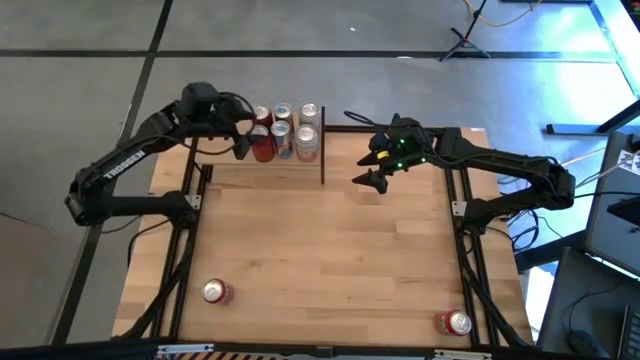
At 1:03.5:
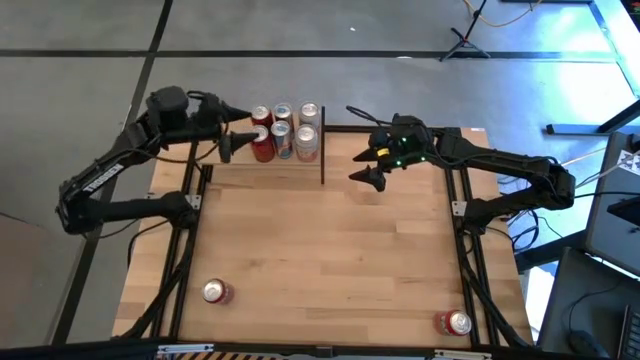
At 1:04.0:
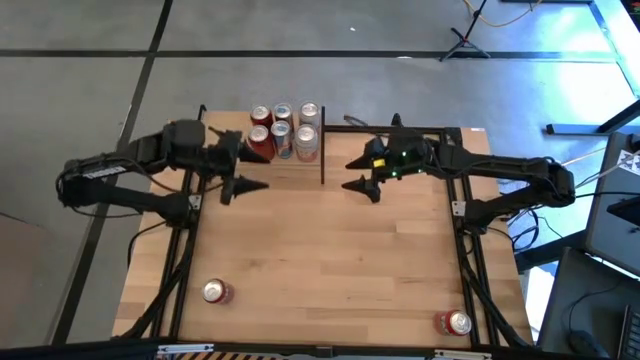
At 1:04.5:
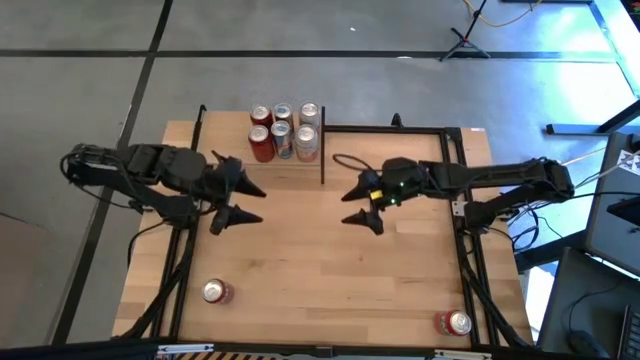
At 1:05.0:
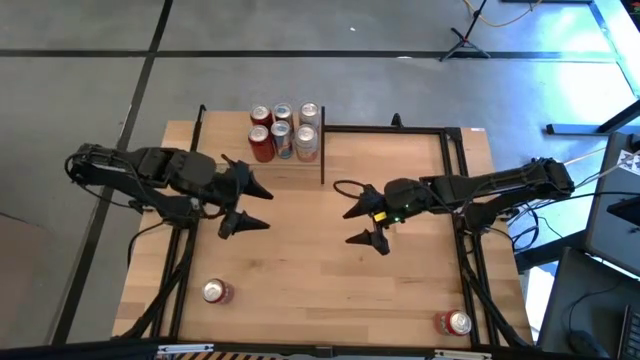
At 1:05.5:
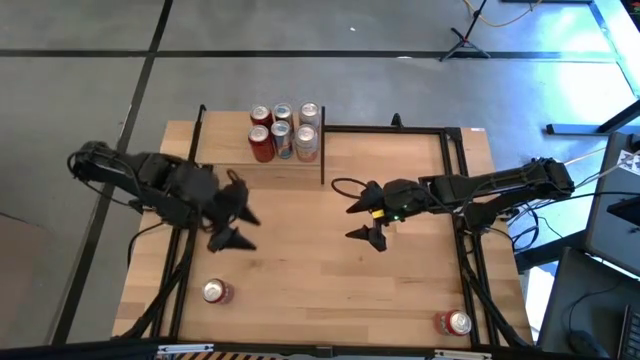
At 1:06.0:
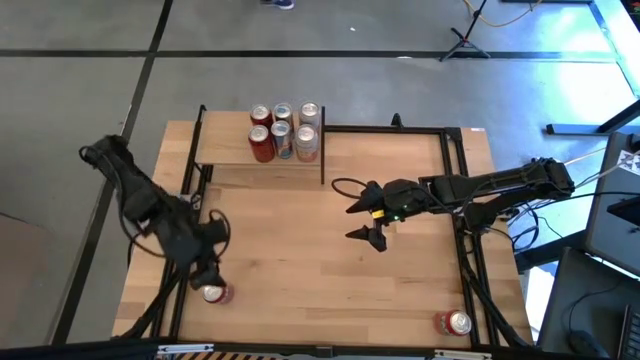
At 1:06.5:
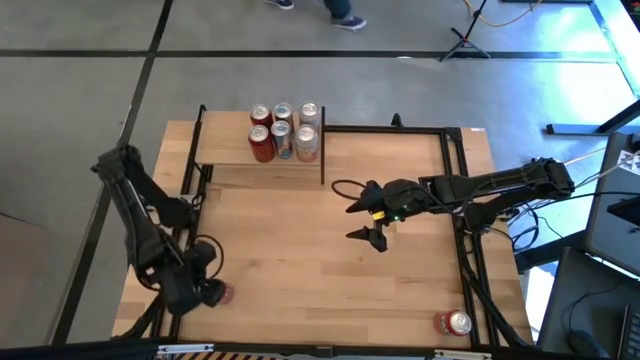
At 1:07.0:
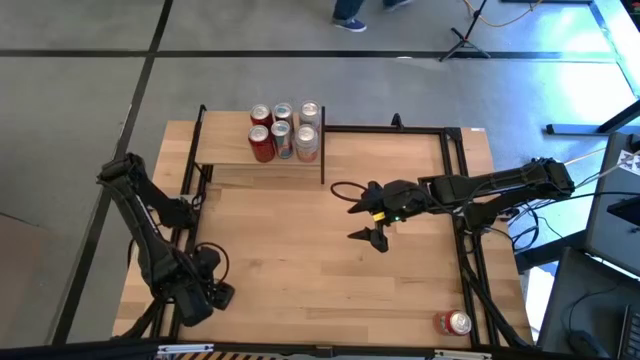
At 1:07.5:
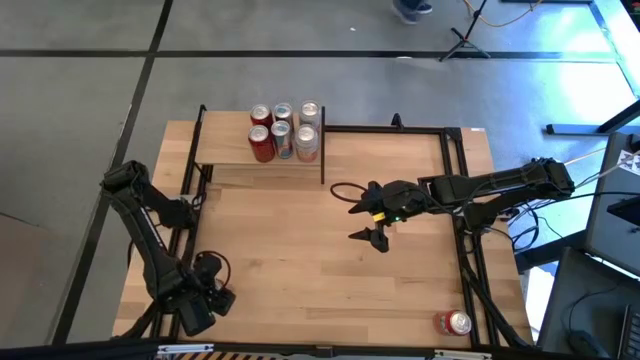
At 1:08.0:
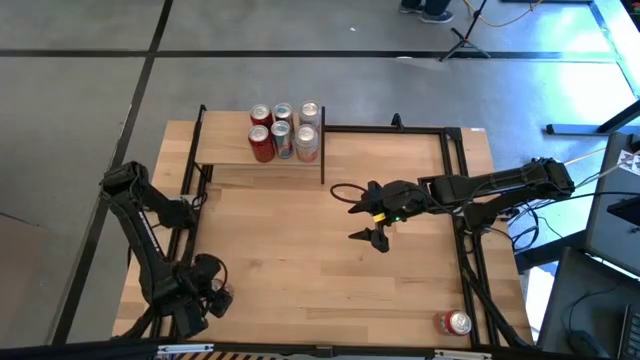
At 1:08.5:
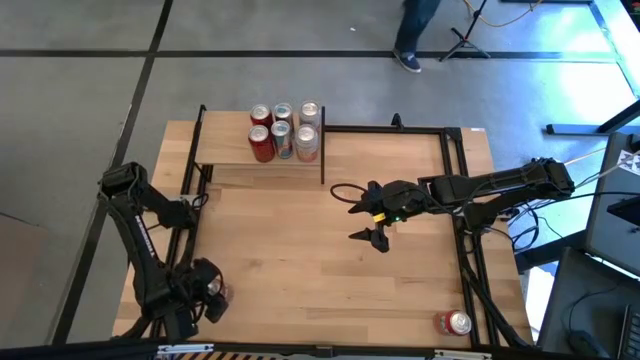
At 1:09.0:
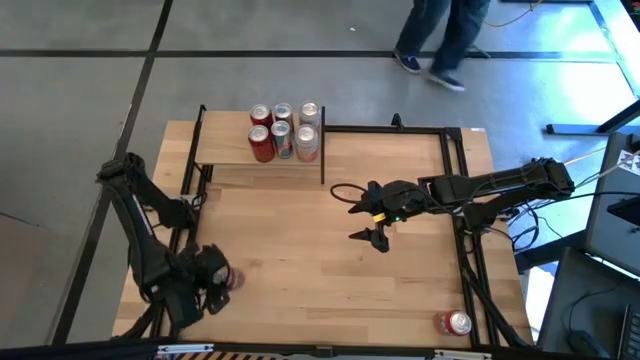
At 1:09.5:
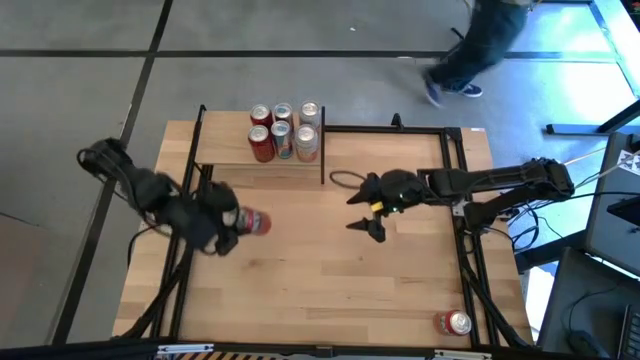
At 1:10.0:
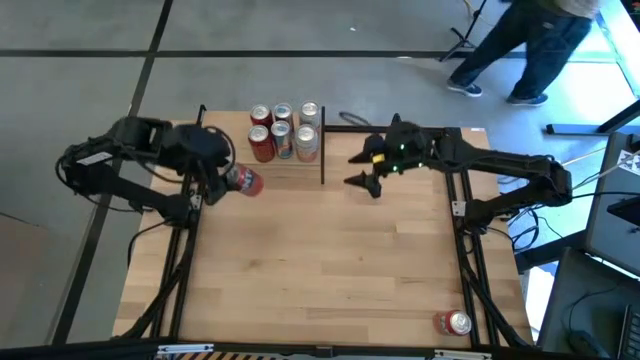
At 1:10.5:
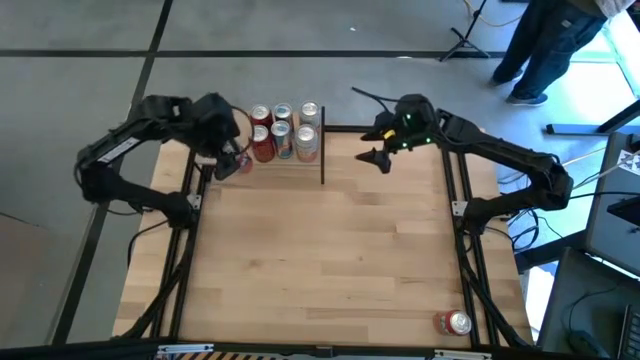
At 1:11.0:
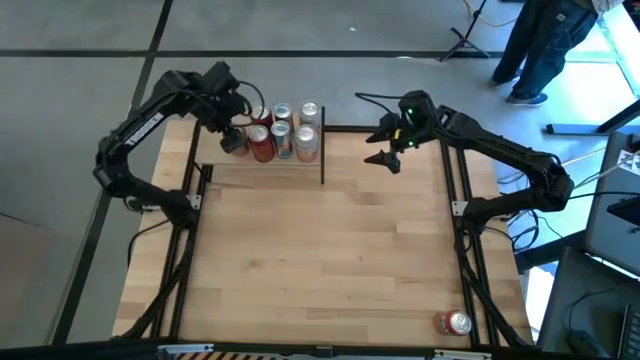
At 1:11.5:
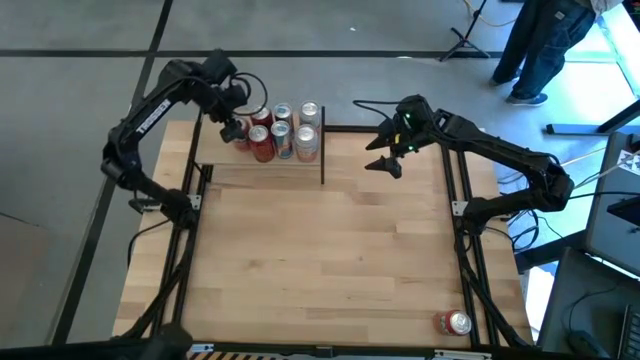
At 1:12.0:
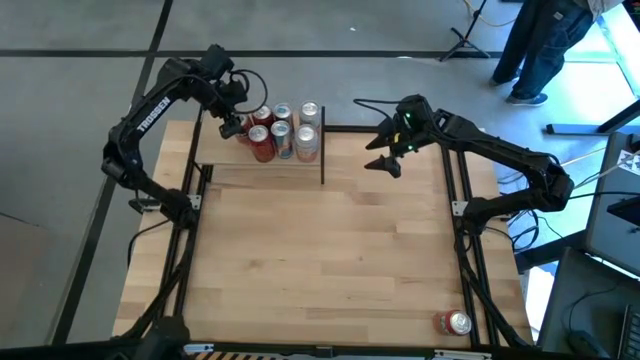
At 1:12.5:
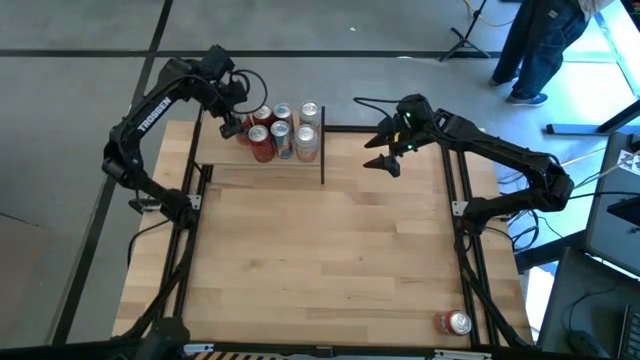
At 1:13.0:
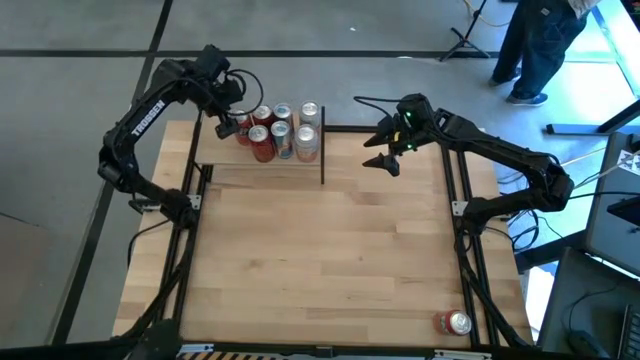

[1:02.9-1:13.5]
Task: Place canned beverage on shelf
Put the left orange soda can on the shelf

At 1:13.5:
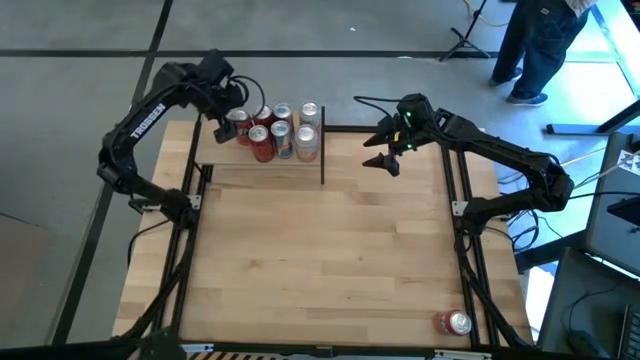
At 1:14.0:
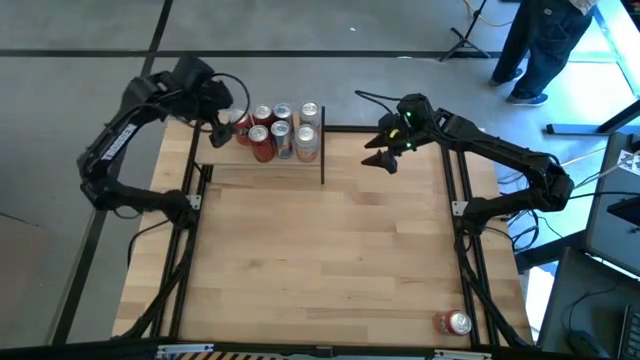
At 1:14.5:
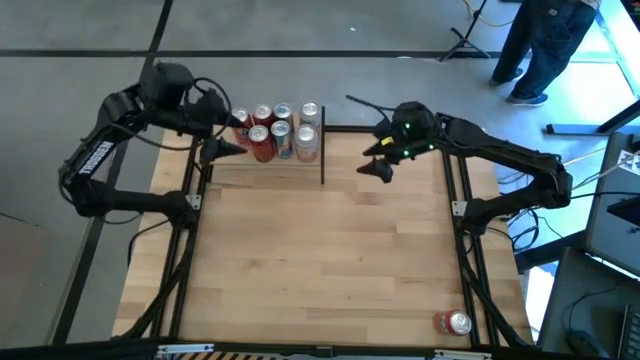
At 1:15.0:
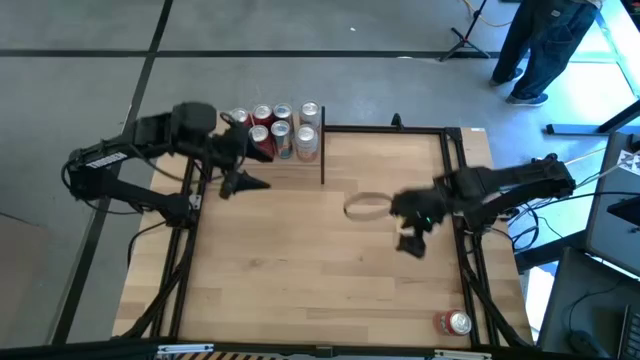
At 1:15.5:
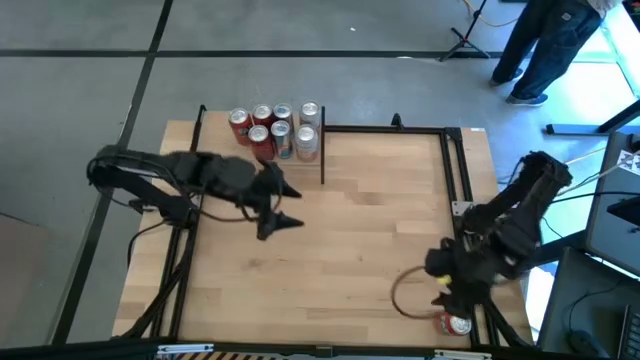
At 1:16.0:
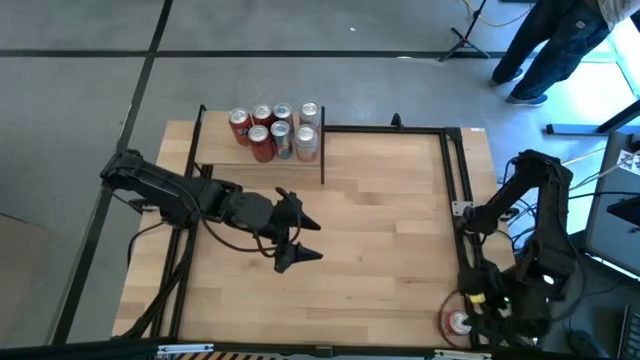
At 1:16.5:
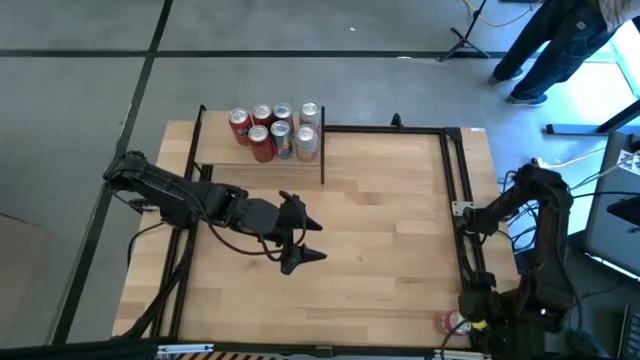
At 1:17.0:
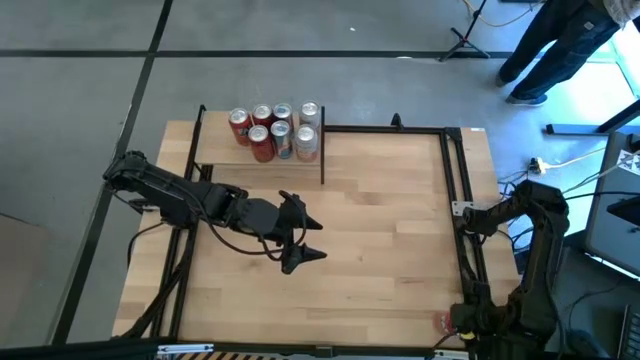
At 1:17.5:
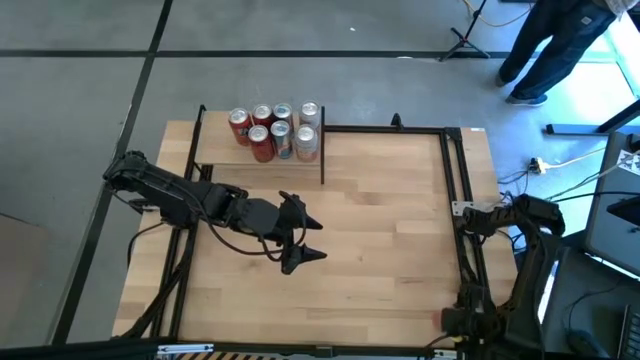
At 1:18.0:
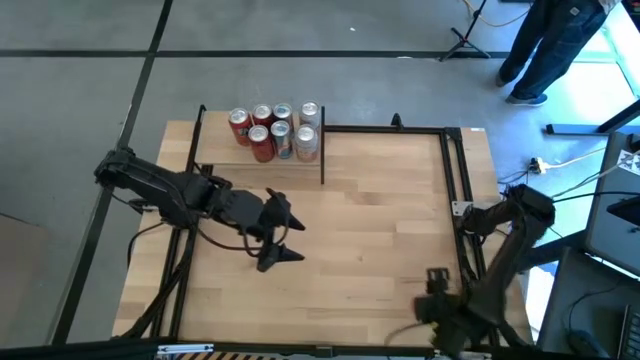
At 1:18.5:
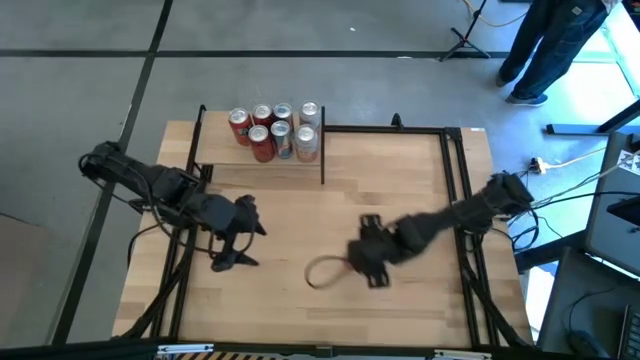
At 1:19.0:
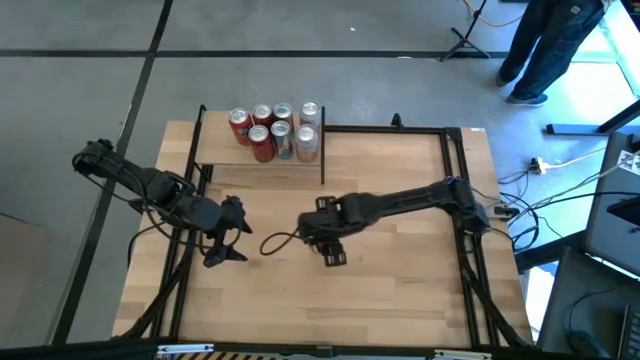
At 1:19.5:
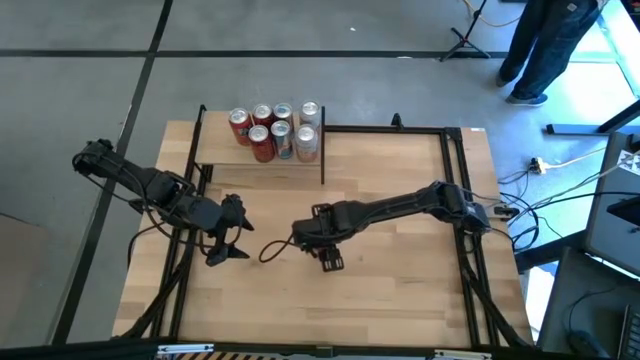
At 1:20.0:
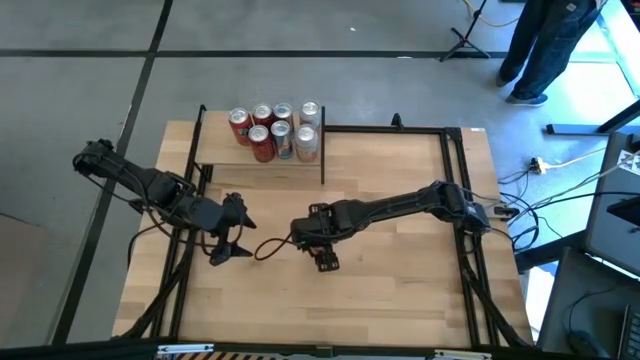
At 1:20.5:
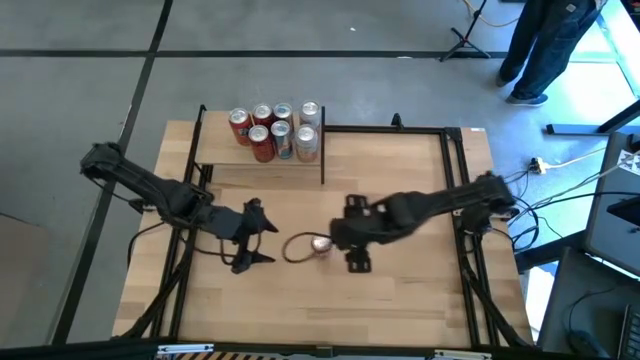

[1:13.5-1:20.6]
Move the orange soda can to the center of the table

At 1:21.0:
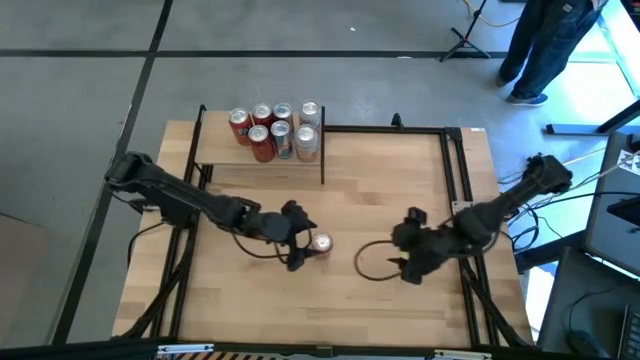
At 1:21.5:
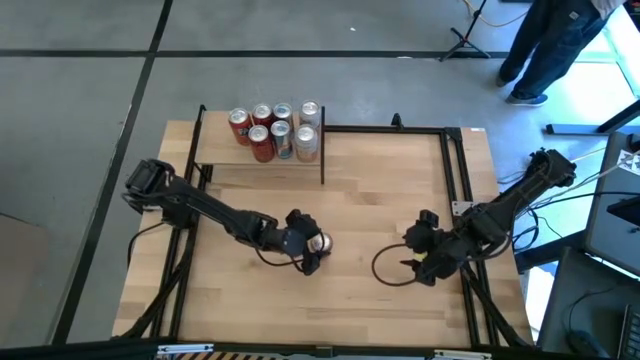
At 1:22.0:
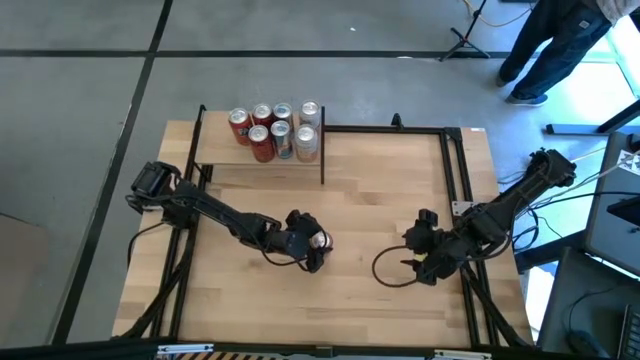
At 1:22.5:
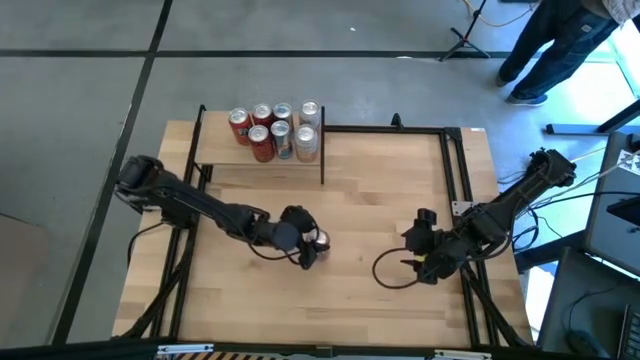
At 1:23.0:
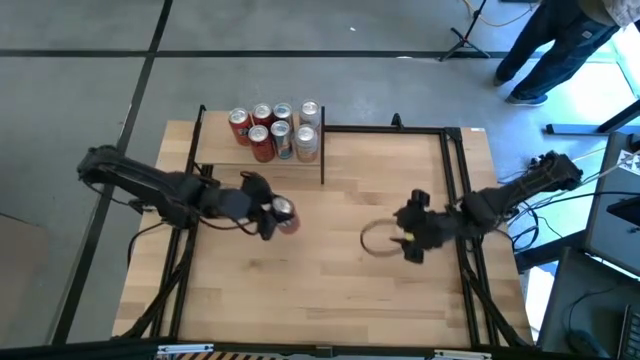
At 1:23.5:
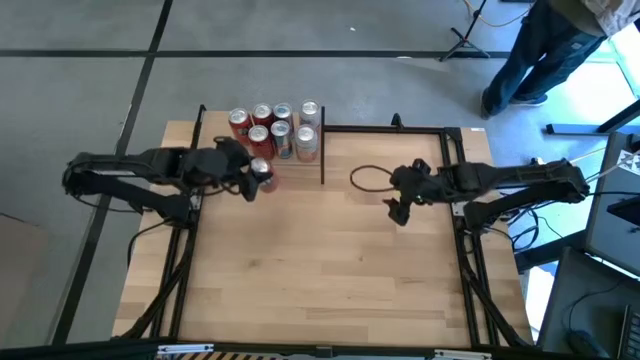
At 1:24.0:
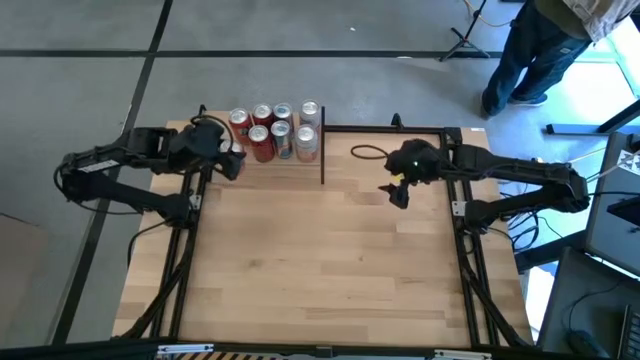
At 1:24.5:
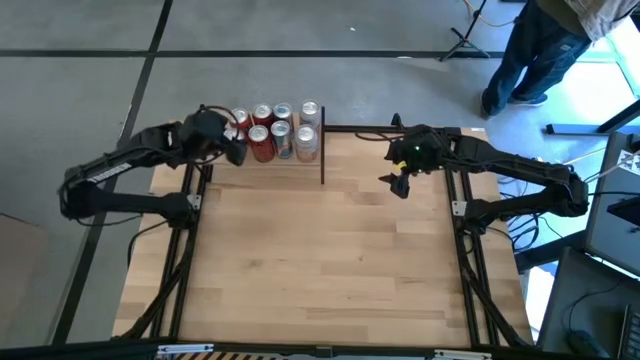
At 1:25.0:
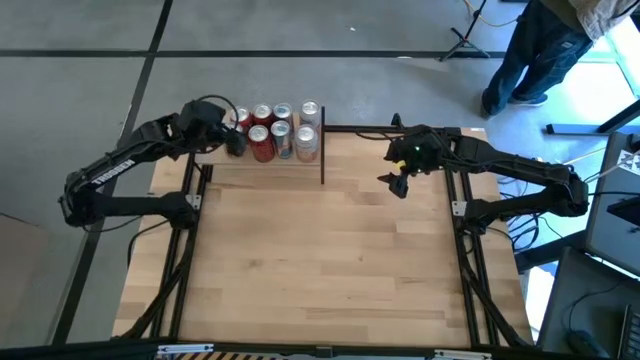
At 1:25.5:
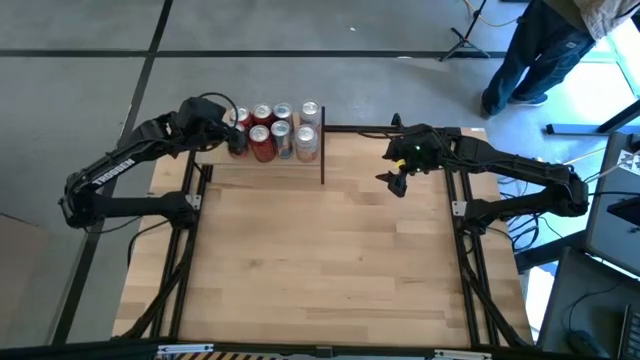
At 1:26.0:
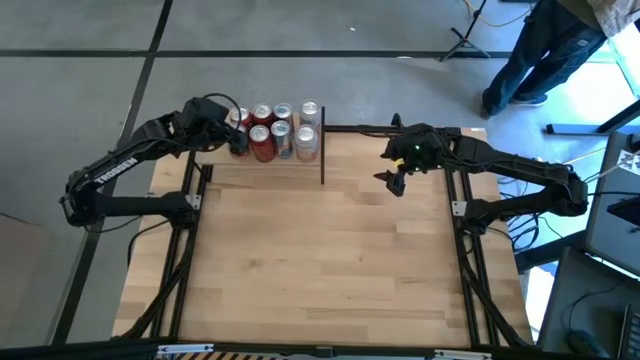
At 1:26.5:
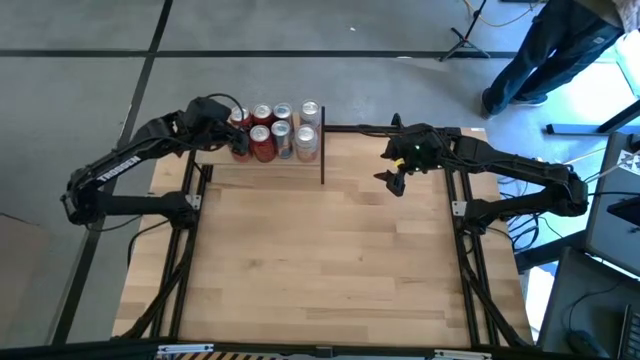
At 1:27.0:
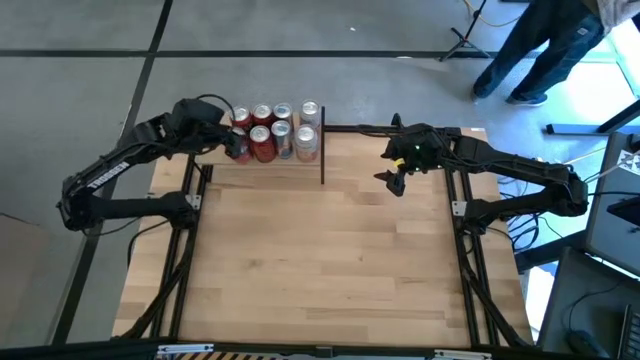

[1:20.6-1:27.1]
Put the orange soda can on the shelf aligned with the other orange soda can
